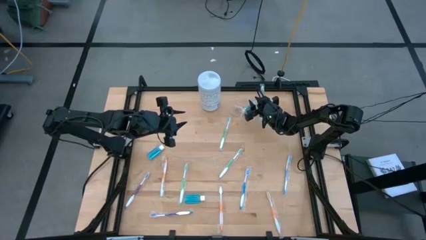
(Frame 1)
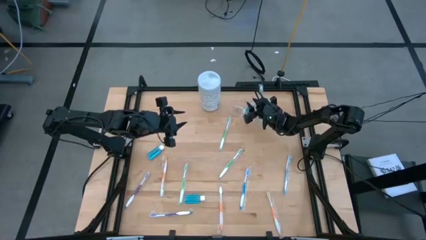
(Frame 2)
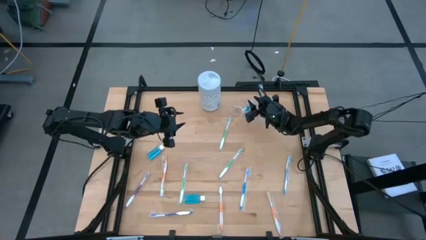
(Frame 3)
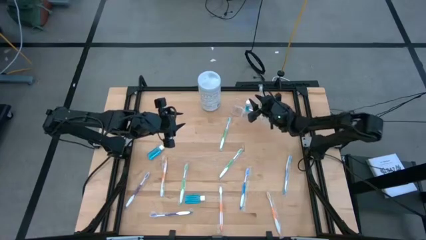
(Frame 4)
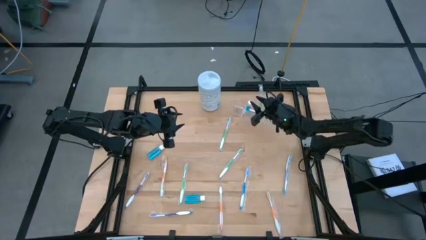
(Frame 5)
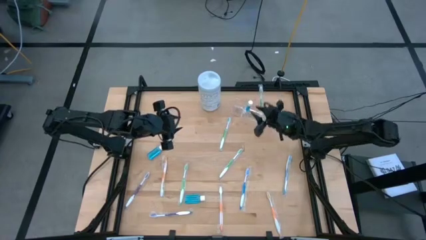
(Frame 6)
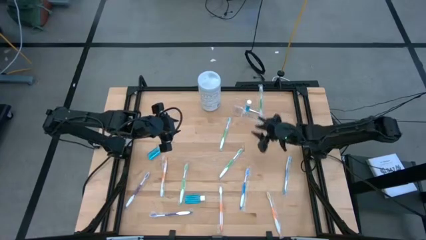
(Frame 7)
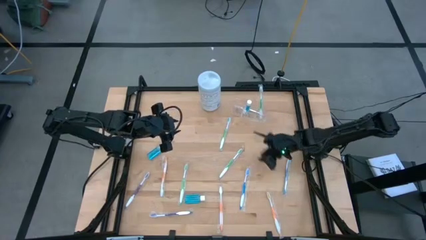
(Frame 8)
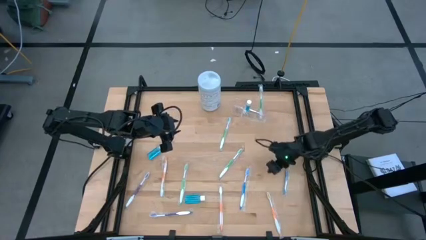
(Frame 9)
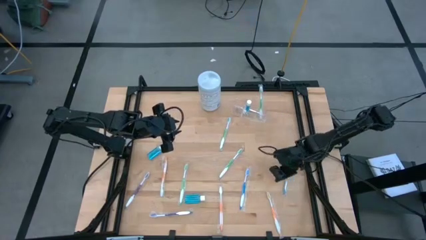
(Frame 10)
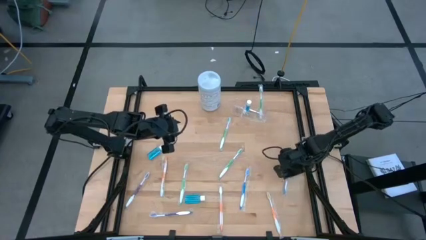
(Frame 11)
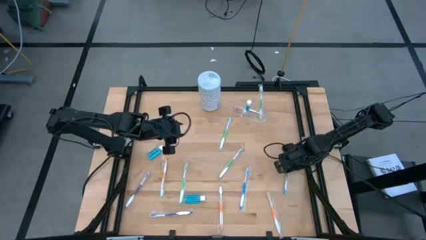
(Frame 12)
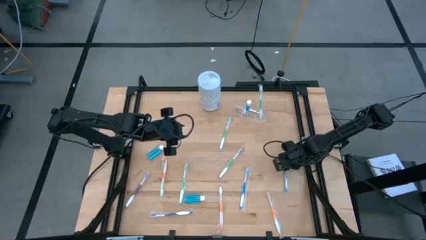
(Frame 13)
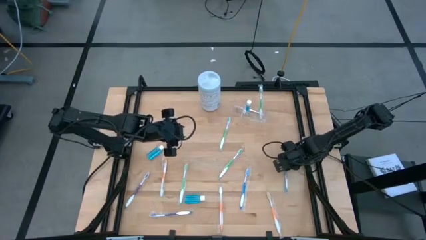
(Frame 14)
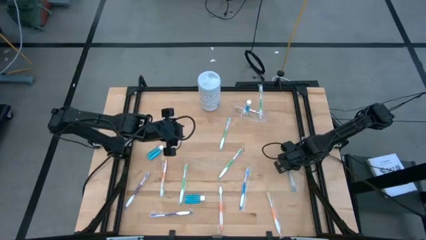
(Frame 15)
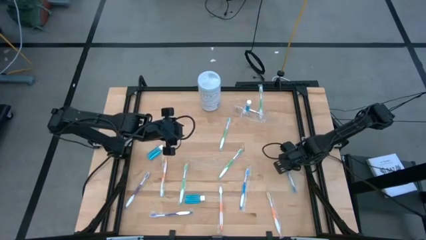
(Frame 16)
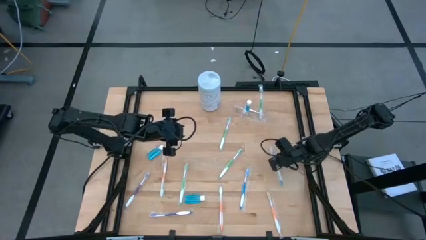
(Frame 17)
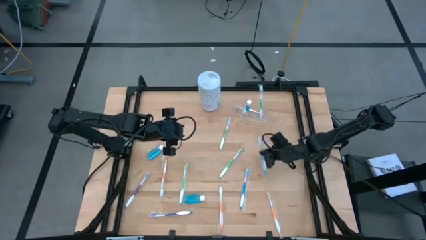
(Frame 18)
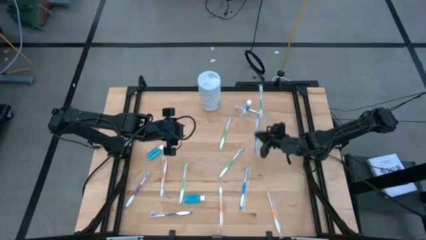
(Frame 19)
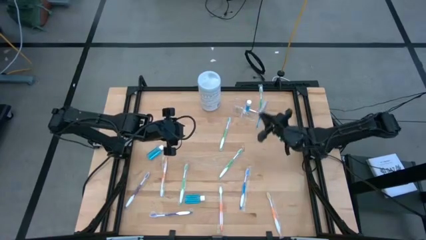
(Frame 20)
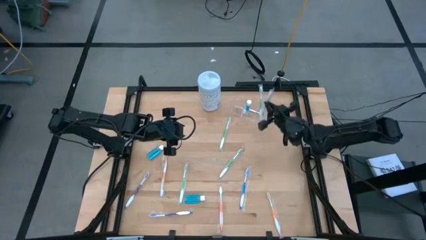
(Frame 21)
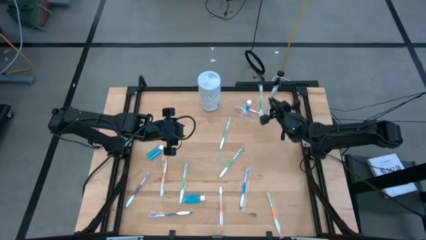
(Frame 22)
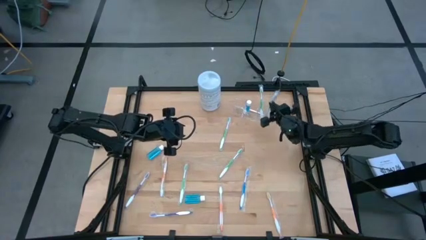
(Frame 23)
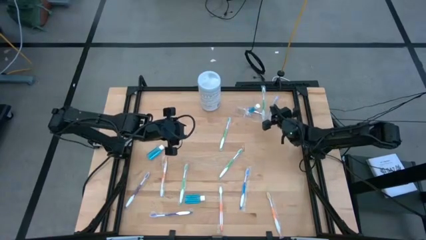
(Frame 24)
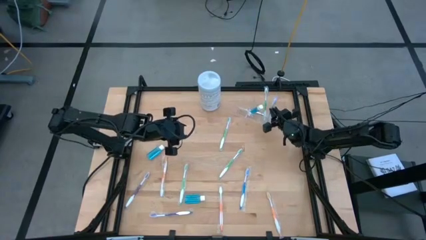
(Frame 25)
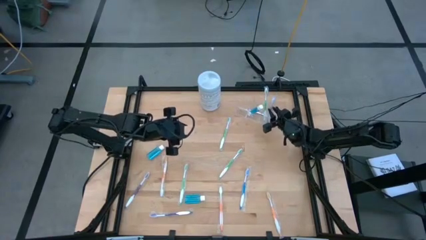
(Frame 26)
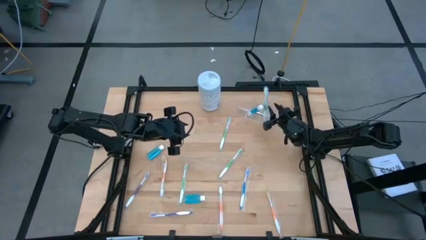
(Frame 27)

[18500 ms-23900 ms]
Task: Pick & Place toothbrushing station
Put the white and blue toothbrush into the transparent mesh organizer

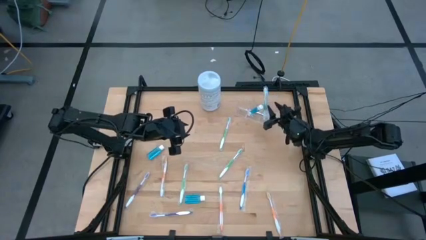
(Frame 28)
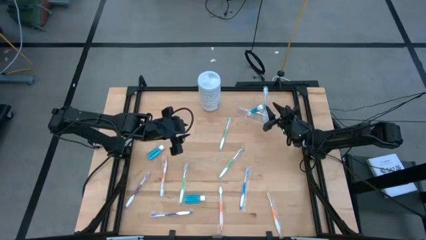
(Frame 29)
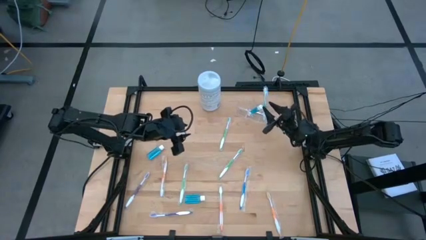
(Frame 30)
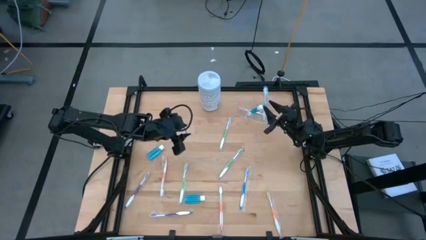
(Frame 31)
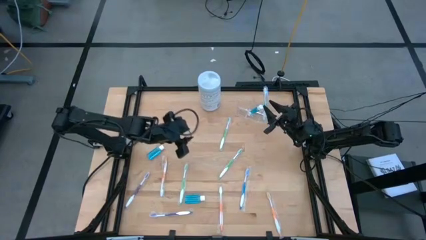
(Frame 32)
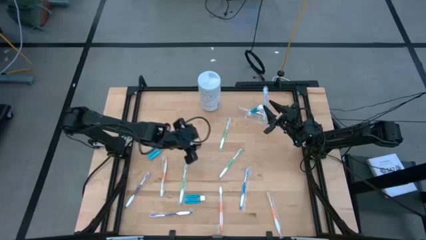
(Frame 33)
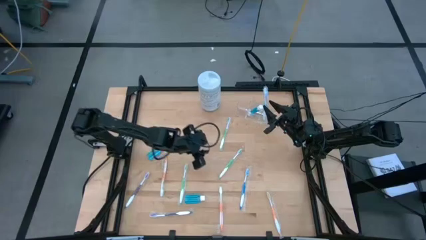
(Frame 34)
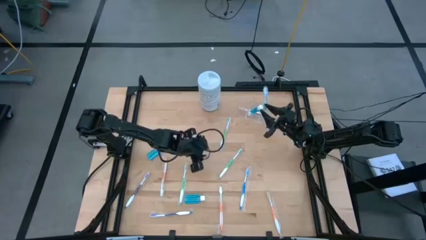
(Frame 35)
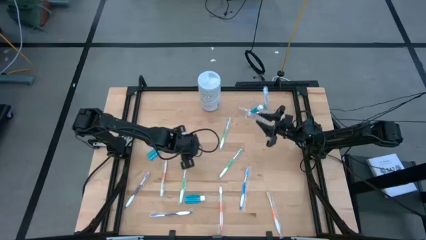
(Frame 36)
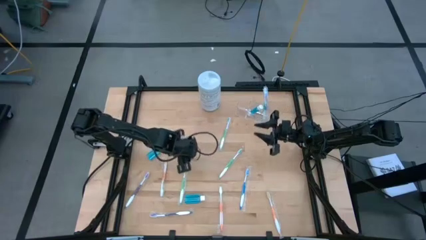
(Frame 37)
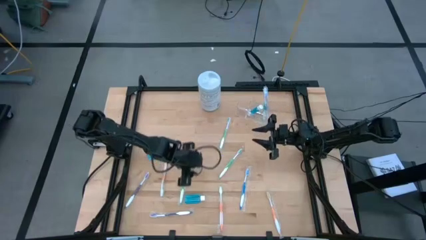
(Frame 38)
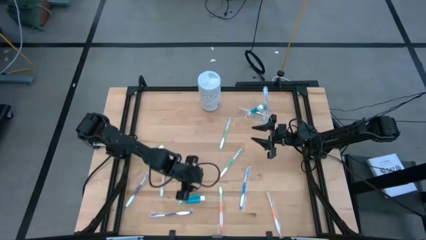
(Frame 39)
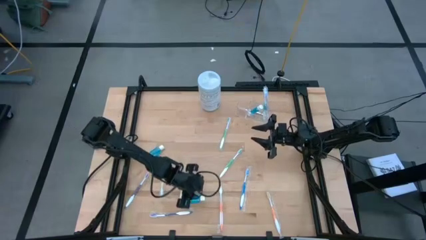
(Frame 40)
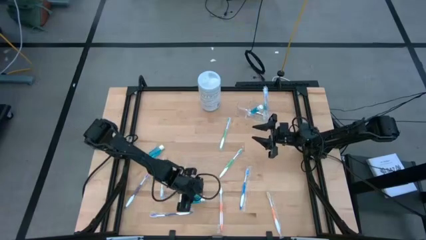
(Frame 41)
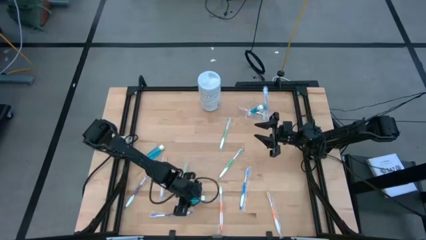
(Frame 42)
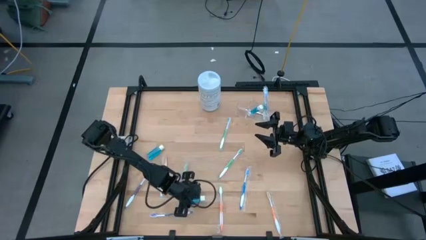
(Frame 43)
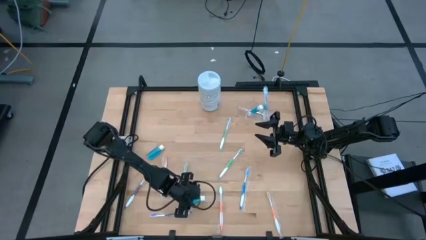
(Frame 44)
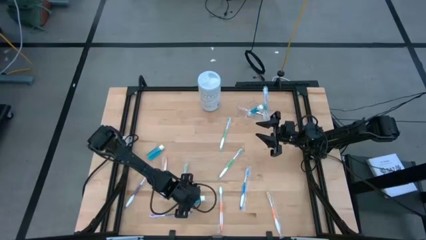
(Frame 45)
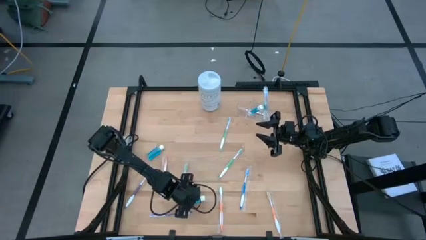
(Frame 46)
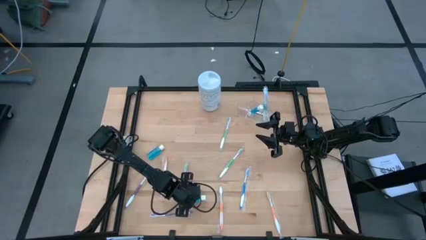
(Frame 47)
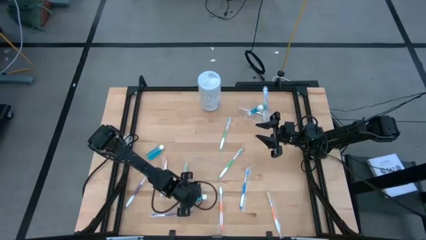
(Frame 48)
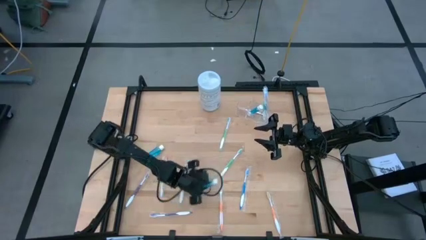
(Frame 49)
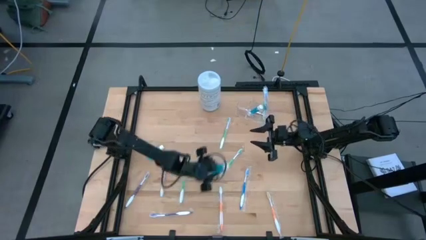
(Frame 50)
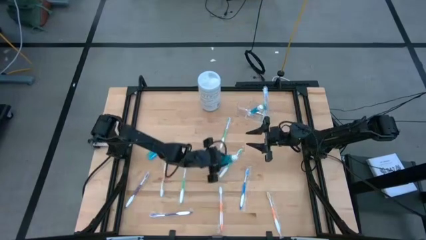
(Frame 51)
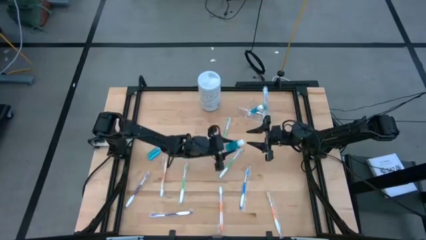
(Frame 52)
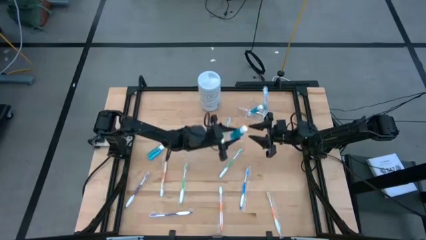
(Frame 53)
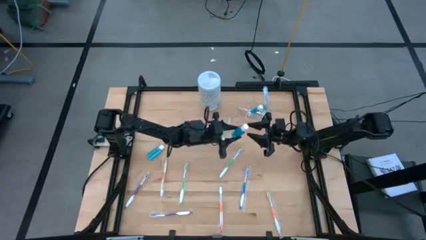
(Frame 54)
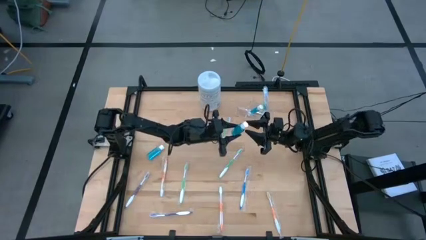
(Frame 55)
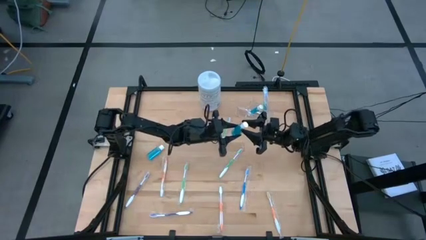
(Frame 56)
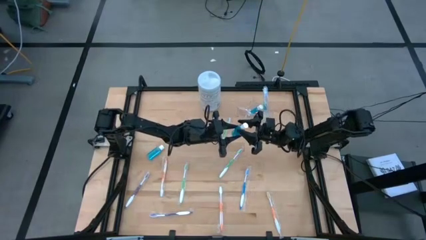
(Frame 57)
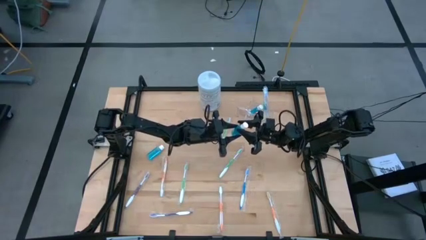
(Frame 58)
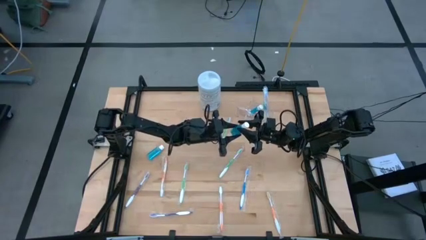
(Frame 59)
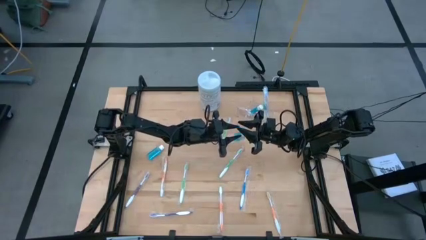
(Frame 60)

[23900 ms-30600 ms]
Put the mouthwash into the transparent mesh organizer

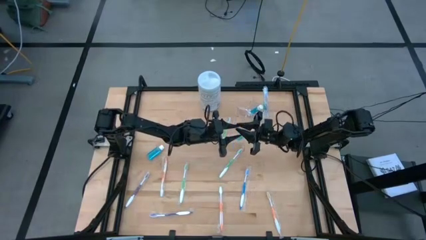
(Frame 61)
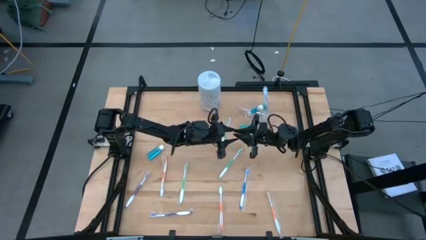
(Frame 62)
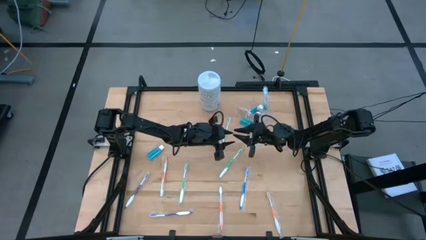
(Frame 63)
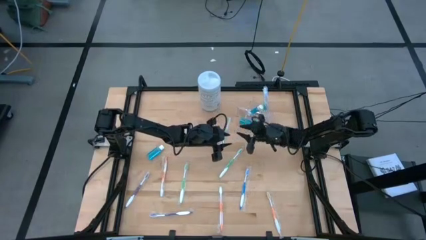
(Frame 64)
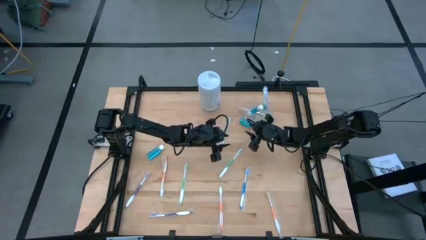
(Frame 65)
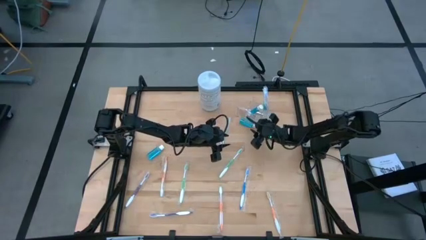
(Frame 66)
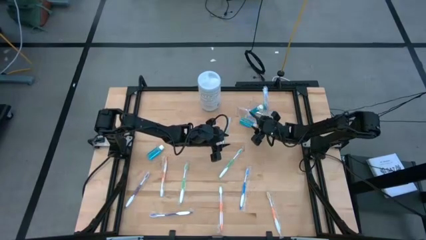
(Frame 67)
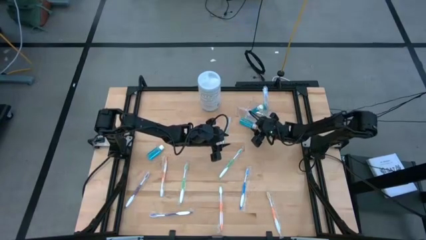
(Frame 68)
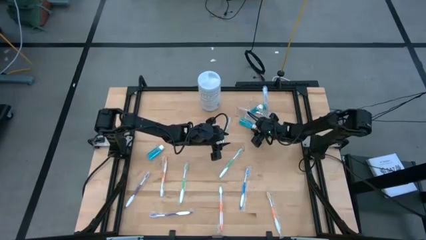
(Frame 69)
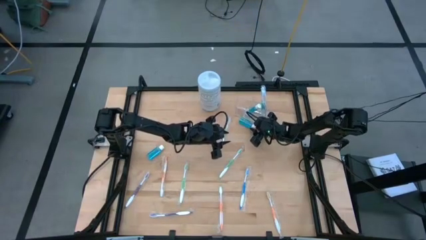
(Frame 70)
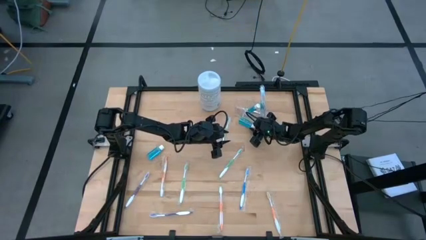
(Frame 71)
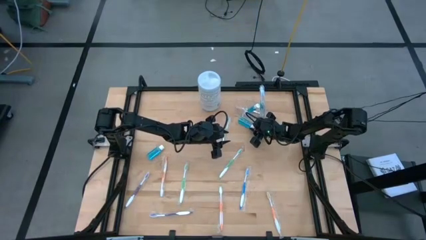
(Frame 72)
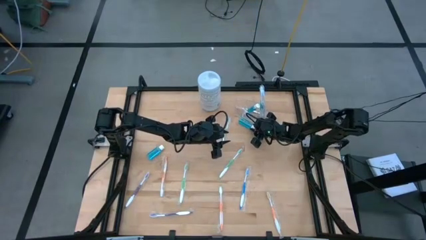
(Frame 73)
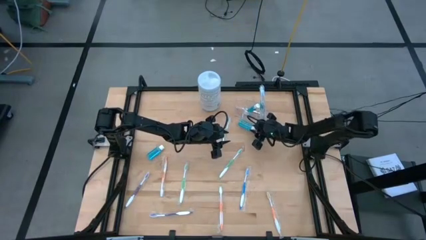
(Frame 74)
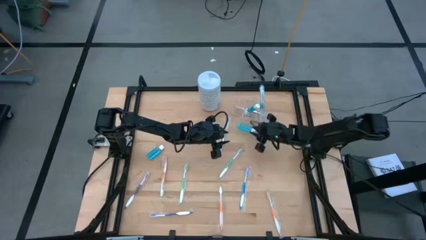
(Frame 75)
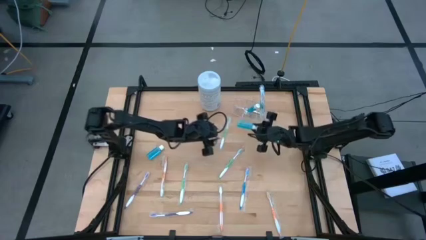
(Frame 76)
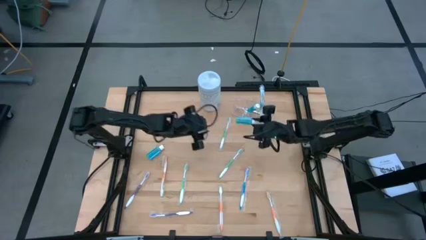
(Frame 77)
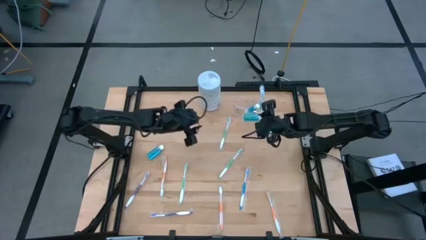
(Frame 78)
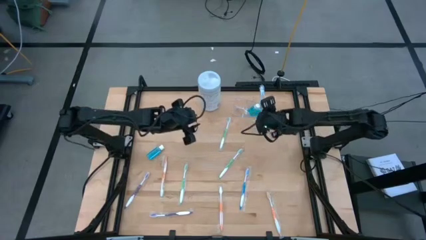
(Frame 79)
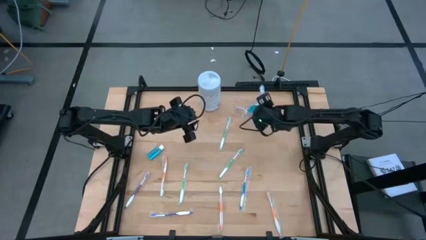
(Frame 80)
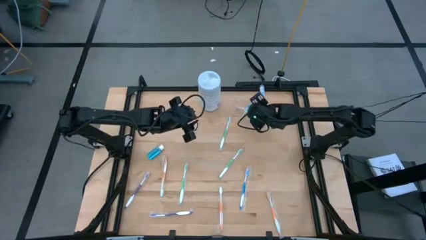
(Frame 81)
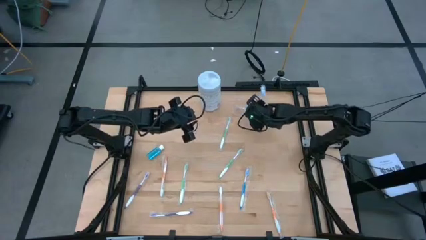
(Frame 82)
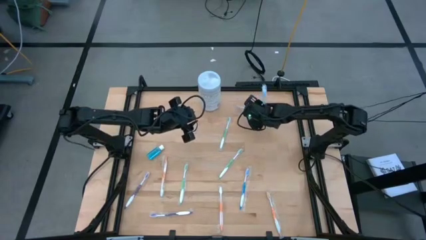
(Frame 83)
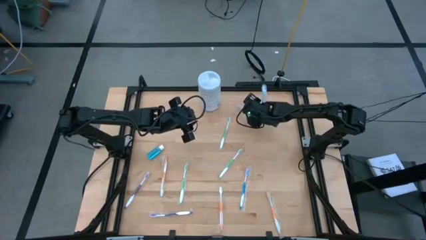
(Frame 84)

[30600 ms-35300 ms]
Put the mouthwash into the transparent mesh organizer

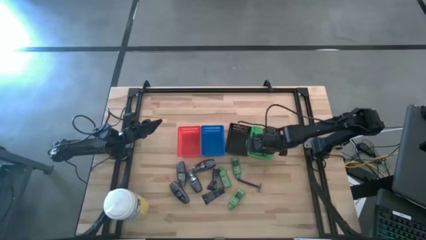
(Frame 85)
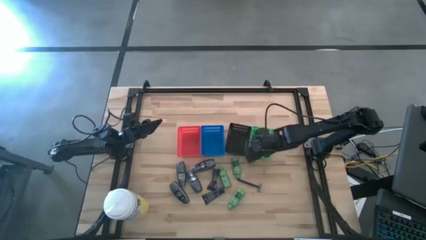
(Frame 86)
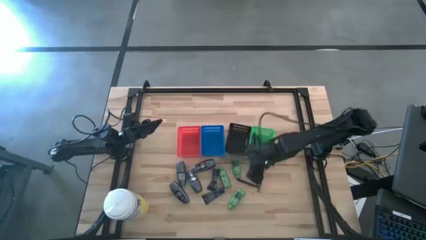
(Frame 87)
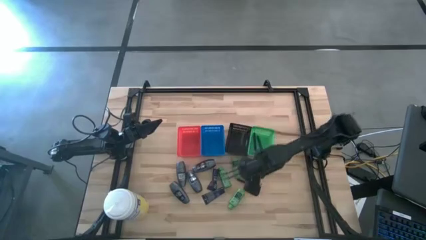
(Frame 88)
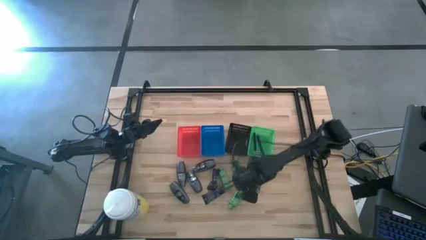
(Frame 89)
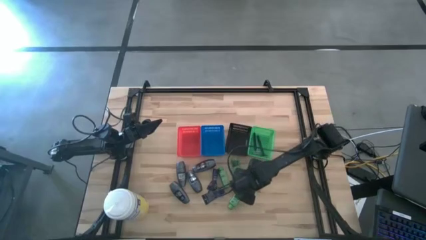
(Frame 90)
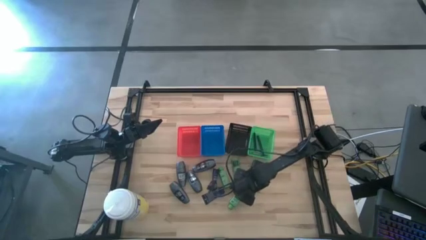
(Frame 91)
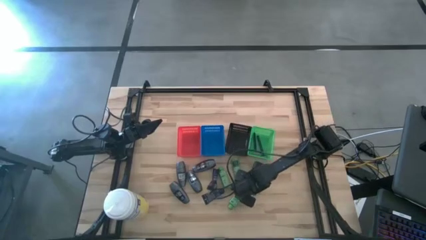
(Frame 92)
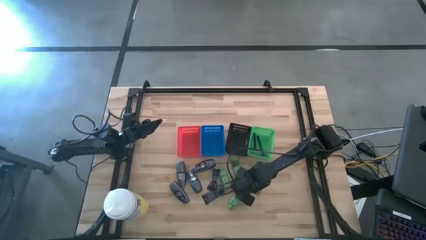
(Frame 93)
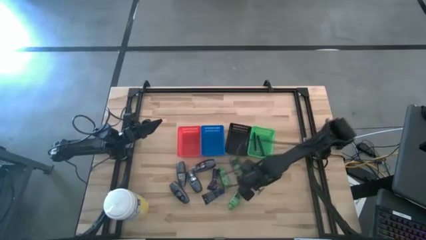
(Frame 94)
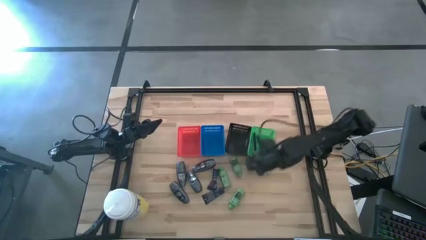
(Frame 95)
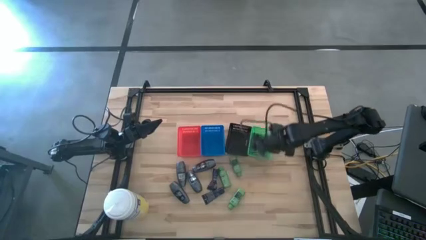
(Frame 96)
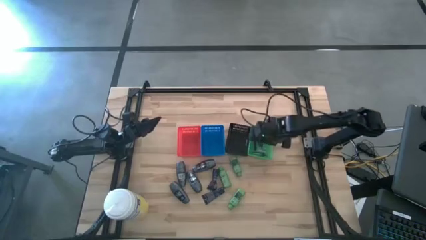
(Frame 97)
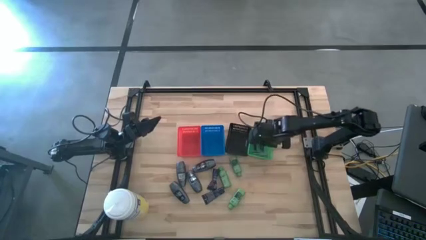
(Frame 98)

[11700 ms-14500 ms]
Task: Pick & Place Travel size toiletries
Put the razor into the green bin
